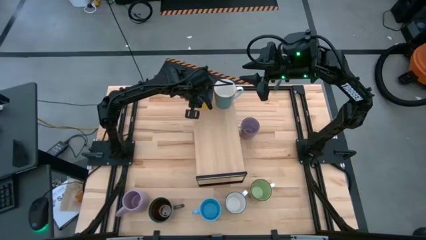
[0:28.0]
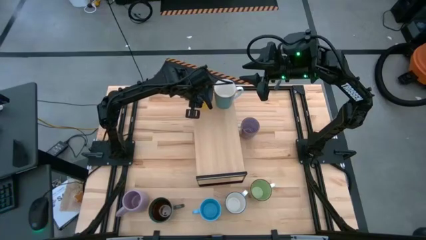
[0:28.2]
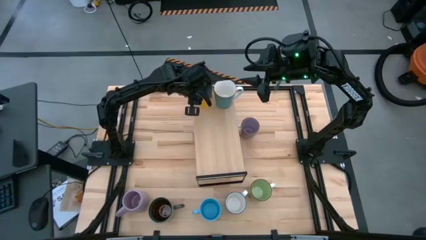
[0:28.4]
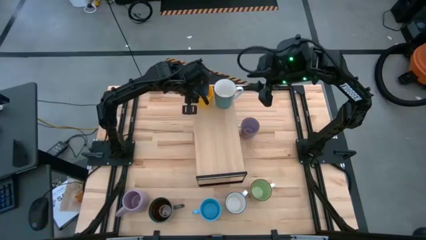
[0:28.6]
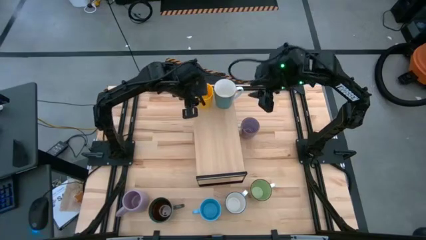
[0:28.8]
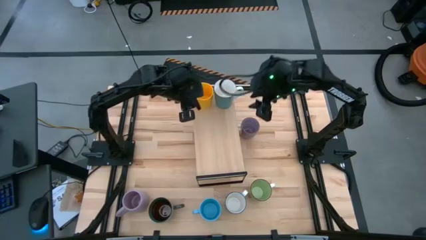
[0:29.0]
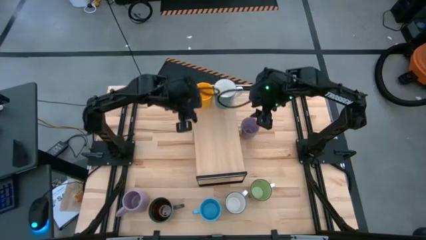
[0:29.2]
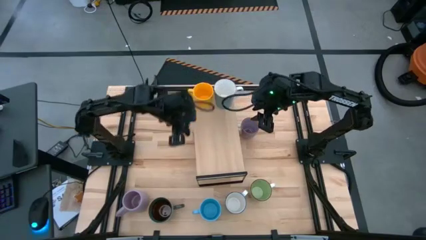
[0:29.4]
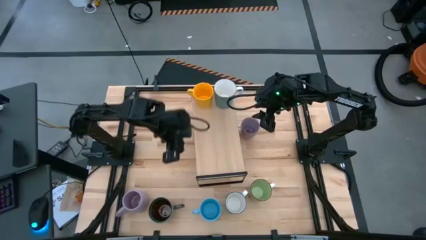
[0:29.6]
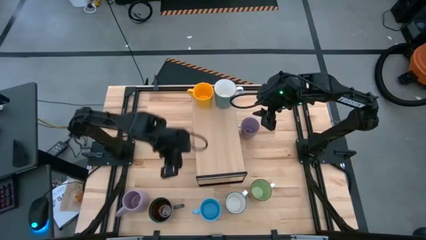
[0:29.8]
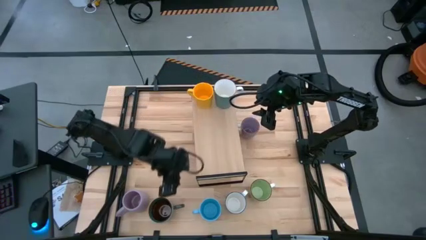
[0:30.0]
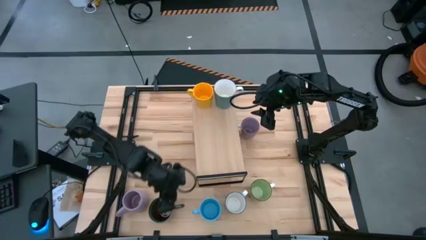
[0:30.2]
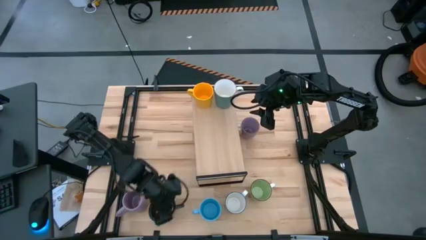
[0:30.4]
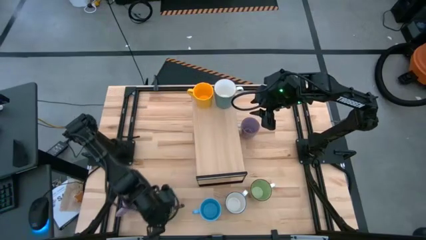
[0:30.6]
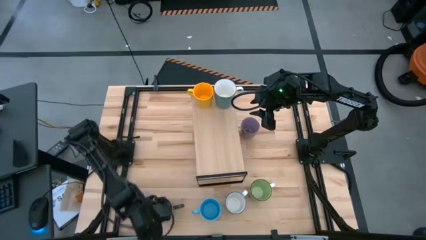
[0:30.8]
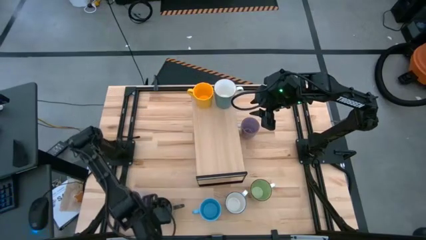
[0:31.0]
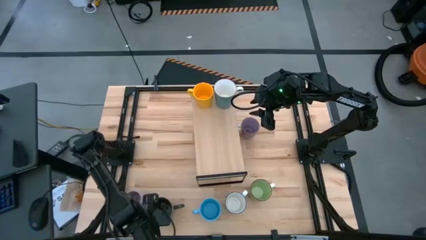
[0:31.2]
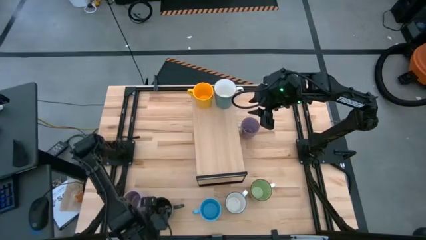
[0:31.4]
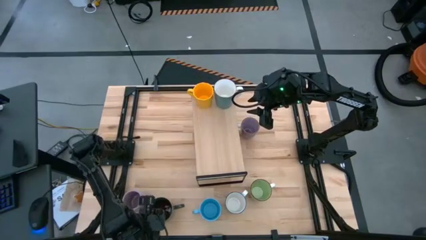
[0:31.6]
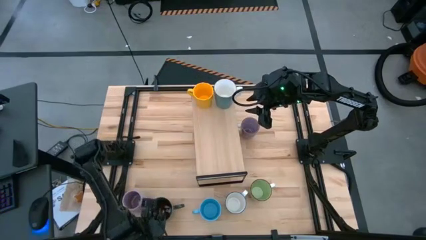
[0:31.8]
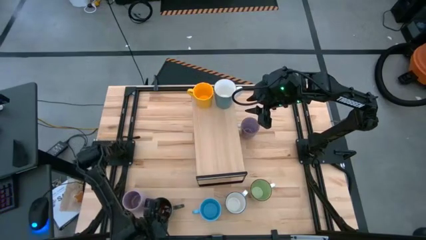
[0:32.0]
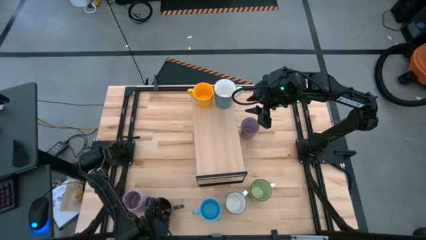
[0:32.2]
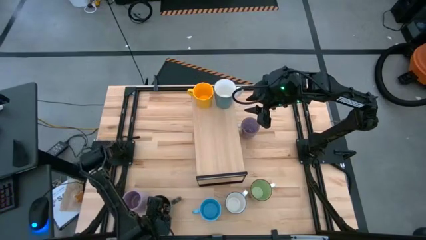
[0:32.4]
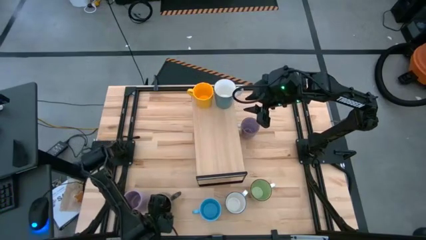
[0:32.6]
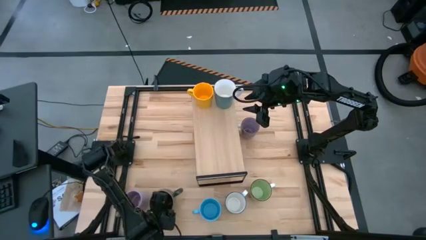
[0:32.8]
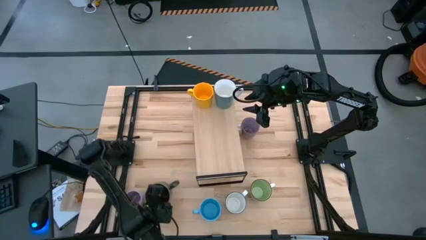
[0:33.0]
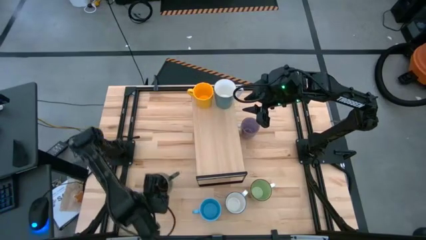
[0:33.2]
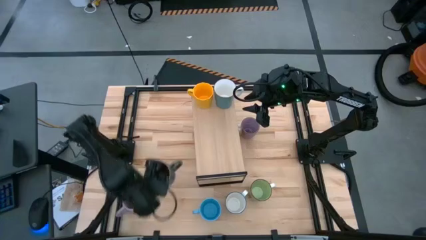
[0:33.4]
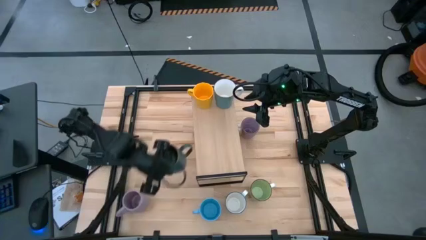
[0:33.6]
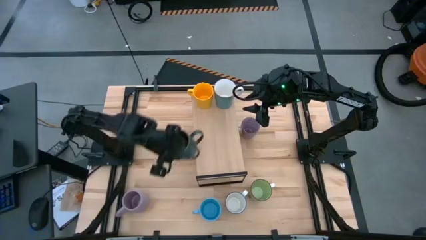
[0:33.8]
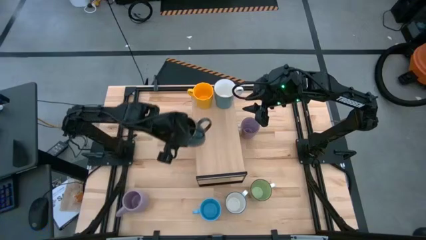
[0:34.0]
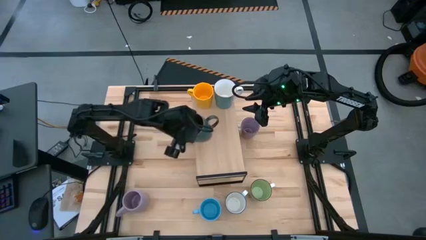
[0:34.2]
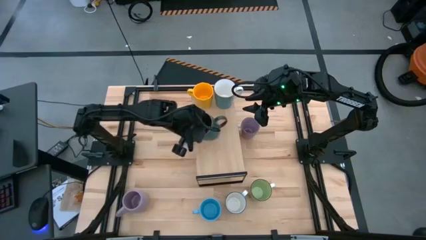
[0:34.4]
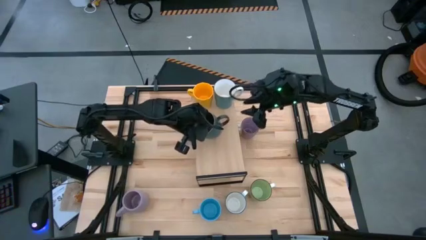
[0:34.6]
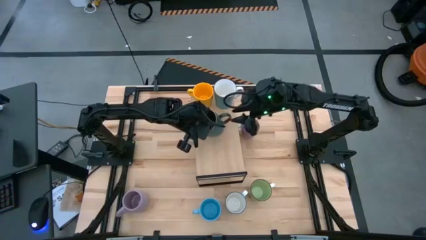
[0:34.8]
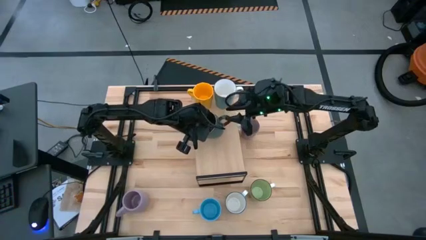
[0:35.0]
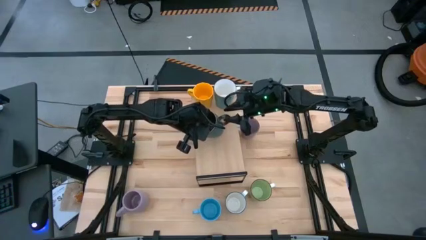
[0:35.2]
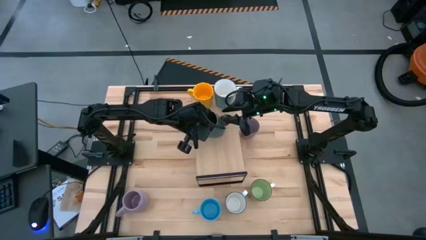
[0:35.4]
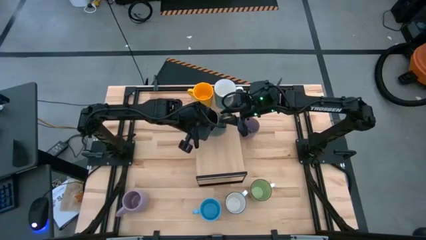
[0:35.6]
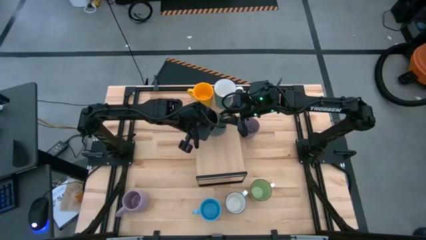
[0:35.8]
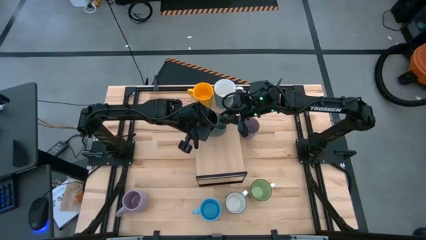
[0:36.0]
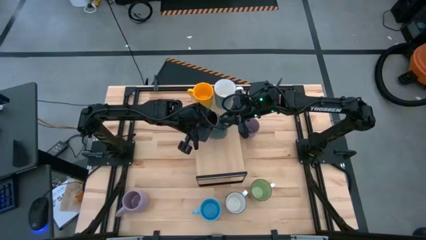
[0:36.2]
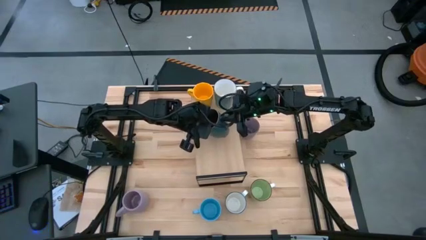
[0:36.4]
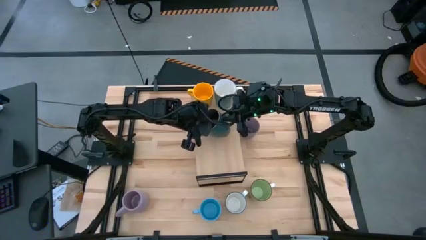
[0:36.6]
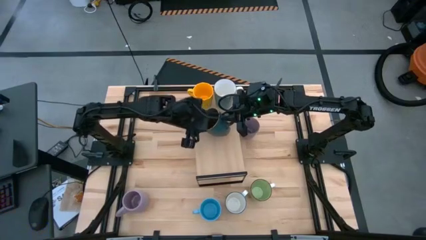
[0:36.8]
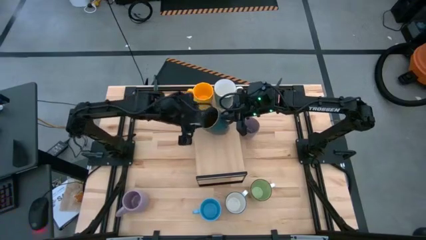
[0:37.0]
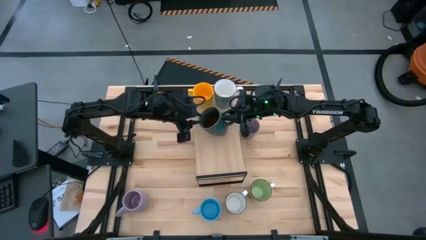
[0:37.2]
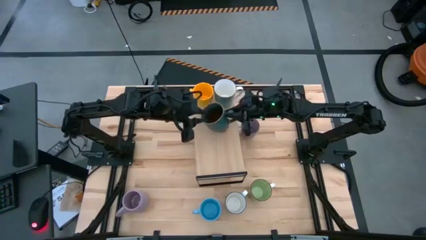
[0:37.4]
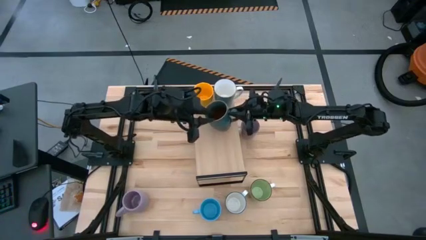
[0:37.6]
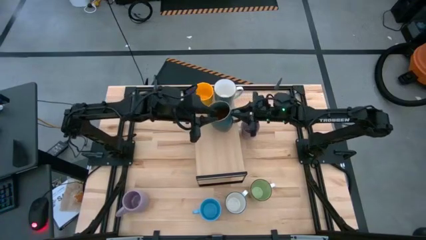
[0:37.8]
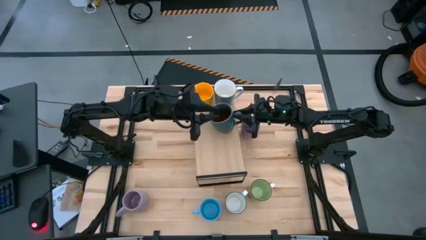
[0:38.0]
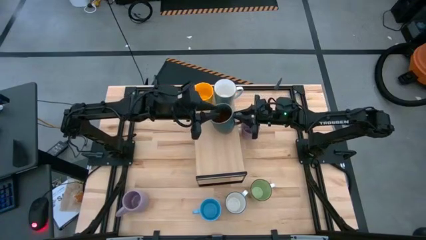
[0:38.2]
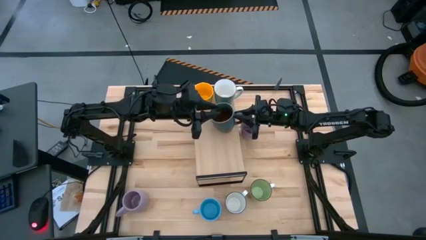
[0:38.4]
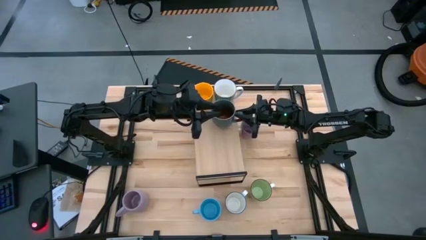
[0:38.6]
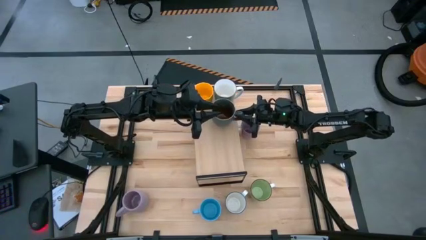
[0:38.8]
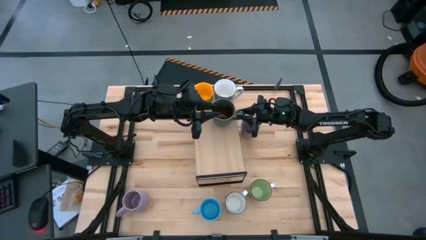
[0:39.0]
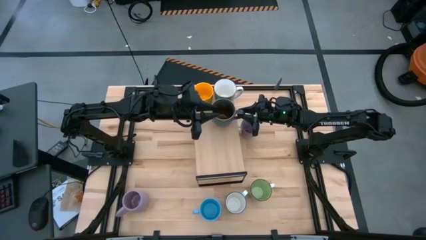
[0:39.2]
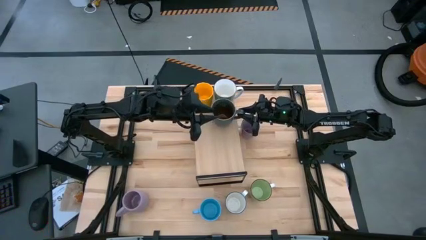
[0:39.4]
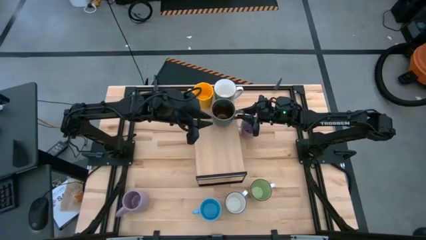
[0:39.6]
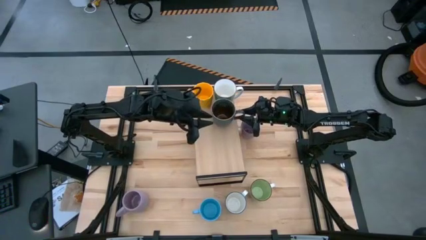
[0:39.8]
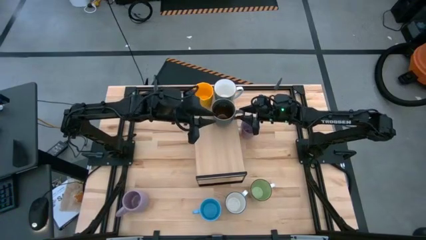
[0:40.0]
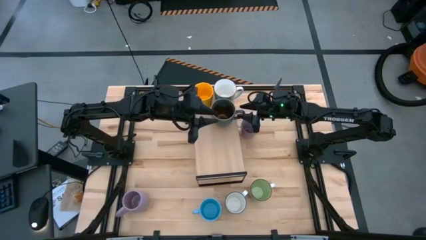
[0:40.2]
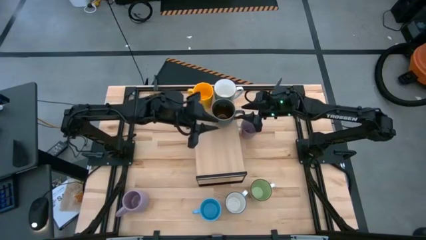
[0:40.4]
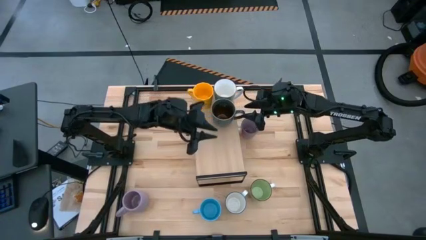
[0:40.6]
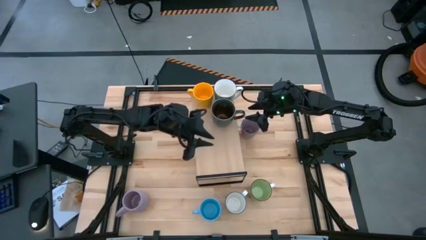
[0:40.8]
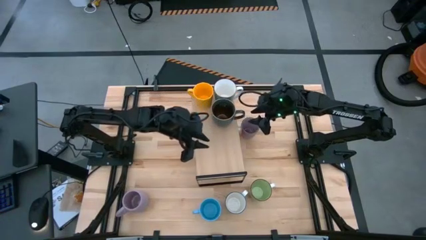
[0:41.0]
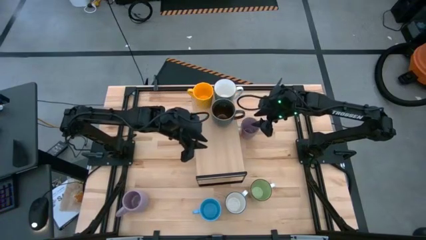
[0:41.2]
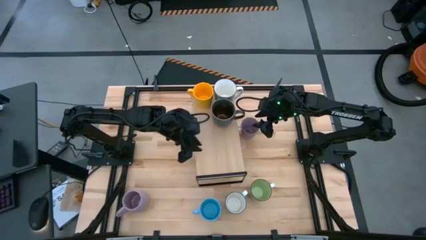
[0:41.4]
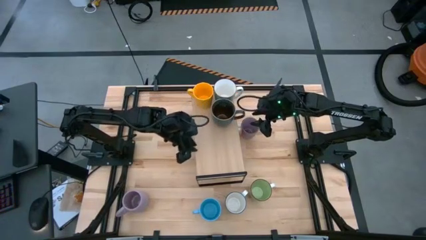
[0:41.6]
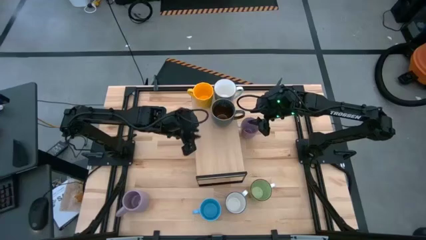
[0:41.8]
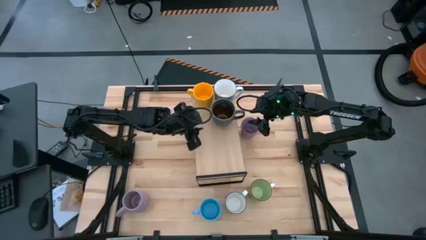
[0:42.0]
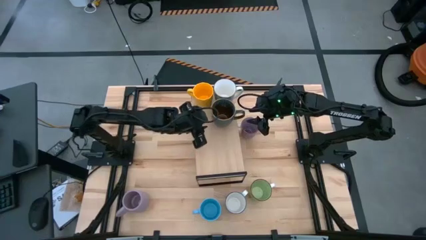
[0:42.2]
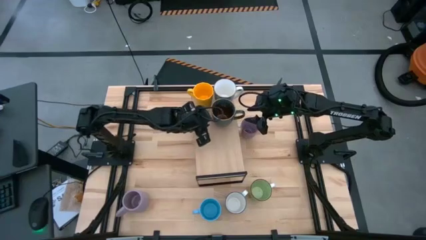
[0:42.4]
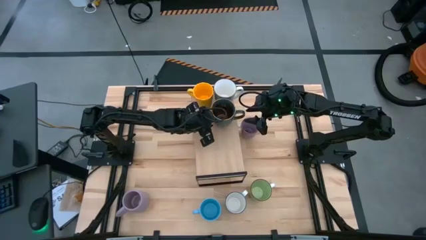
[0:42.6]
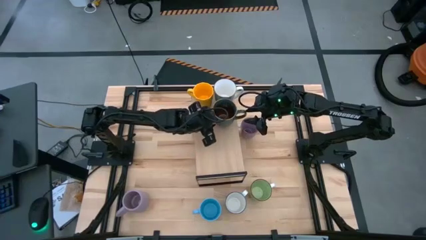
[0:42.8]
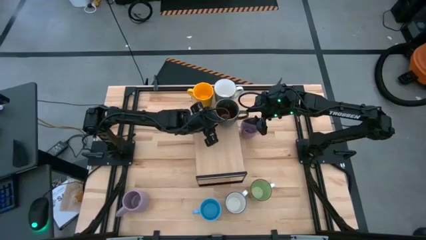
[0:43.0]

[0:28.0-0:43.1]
Task: Place coffee mugs
Put the dark green patterned mug on the shelf
